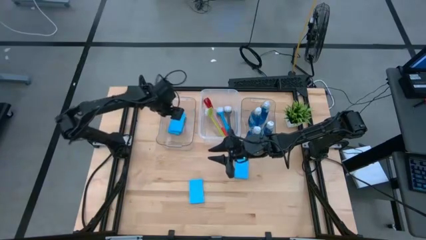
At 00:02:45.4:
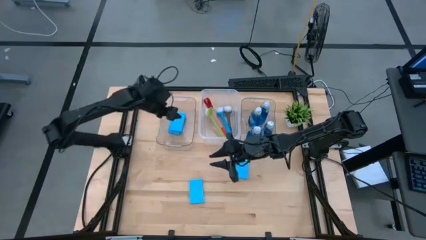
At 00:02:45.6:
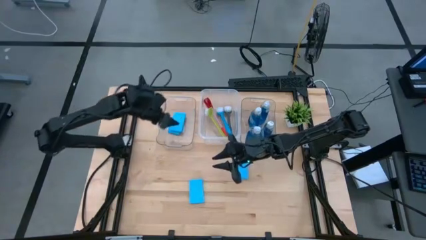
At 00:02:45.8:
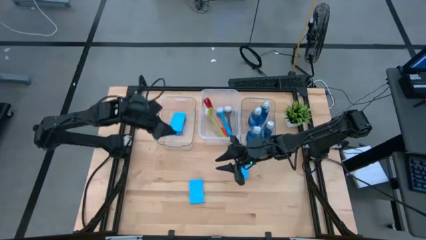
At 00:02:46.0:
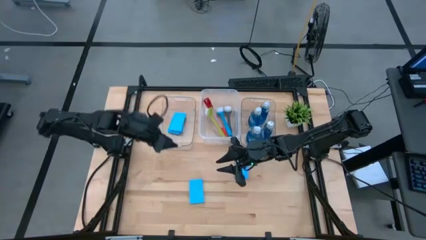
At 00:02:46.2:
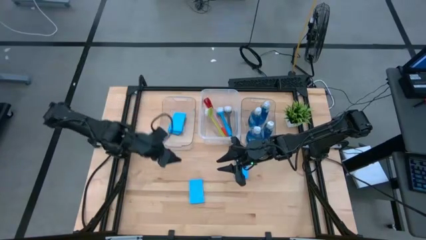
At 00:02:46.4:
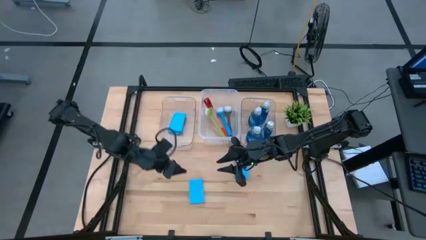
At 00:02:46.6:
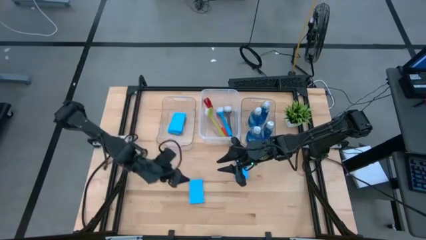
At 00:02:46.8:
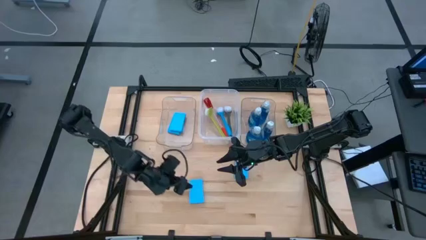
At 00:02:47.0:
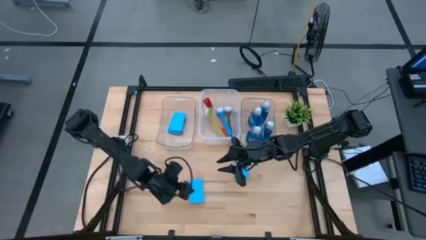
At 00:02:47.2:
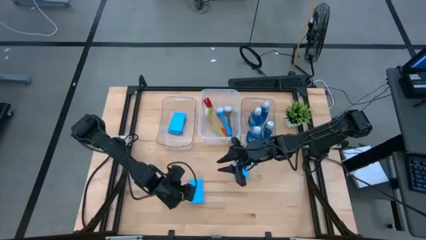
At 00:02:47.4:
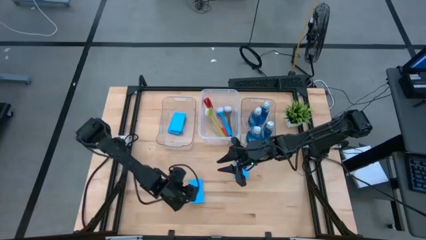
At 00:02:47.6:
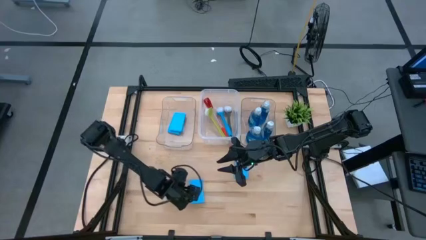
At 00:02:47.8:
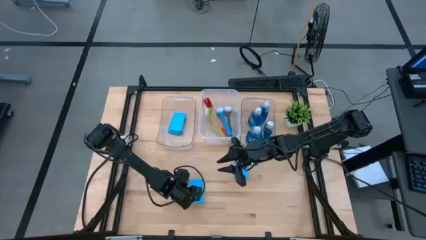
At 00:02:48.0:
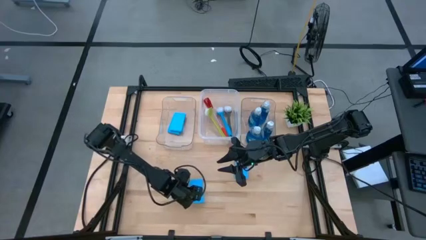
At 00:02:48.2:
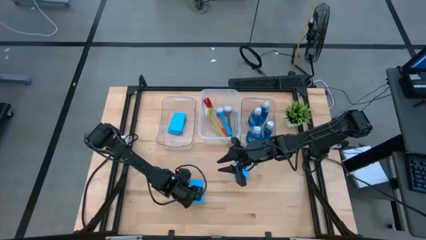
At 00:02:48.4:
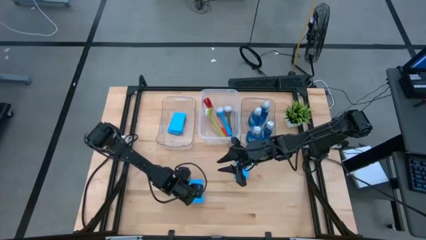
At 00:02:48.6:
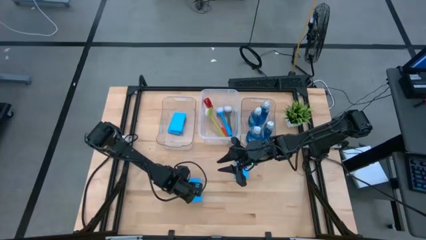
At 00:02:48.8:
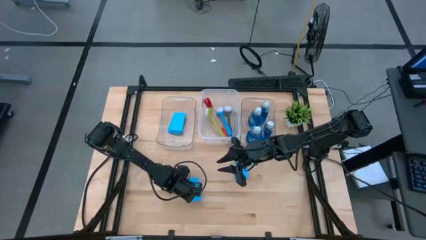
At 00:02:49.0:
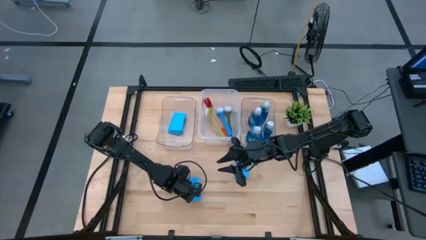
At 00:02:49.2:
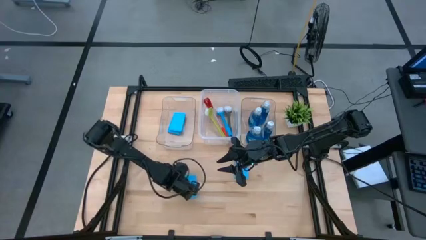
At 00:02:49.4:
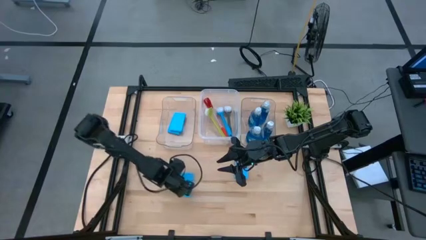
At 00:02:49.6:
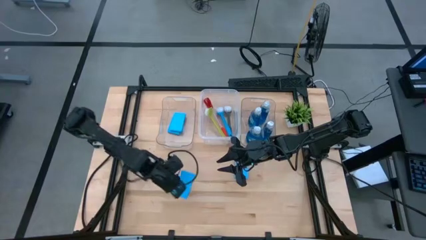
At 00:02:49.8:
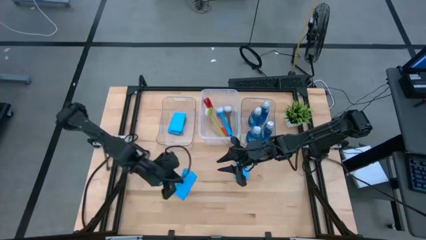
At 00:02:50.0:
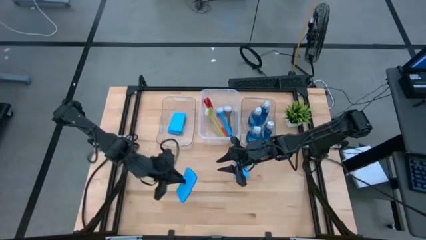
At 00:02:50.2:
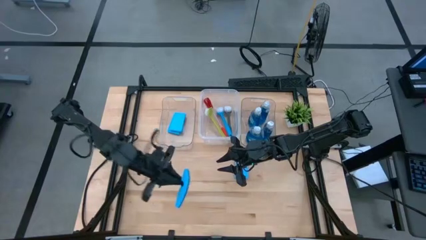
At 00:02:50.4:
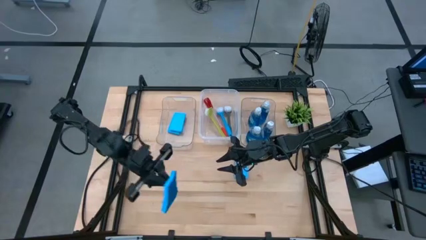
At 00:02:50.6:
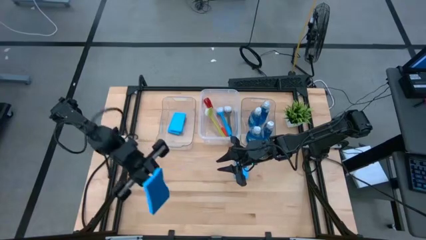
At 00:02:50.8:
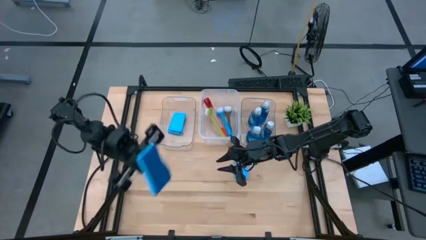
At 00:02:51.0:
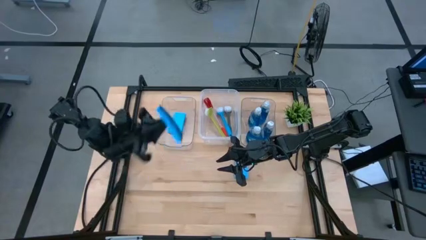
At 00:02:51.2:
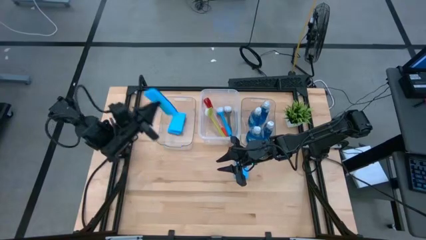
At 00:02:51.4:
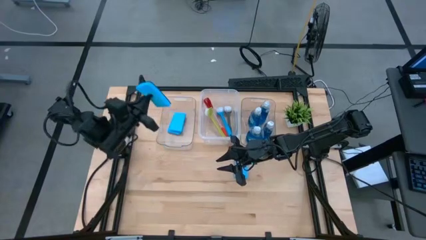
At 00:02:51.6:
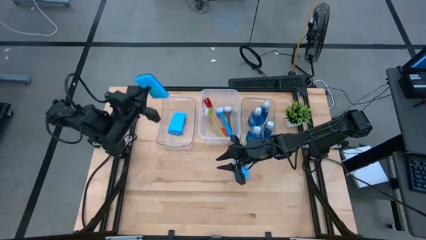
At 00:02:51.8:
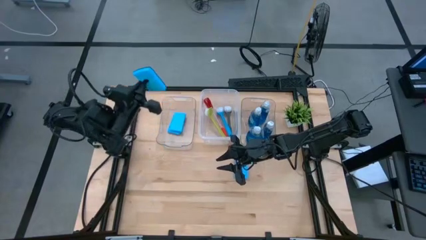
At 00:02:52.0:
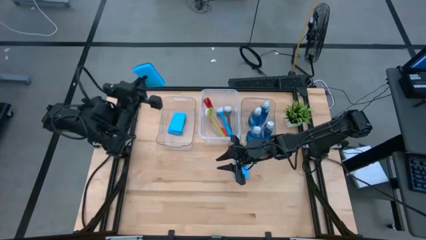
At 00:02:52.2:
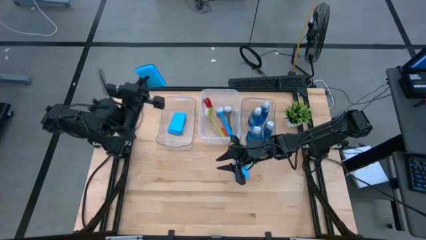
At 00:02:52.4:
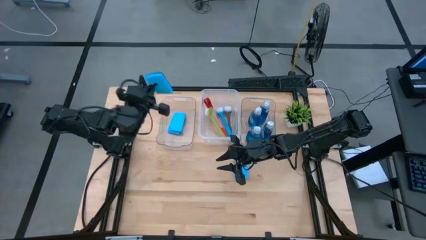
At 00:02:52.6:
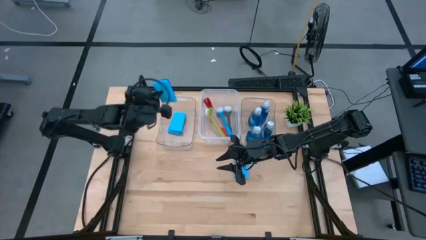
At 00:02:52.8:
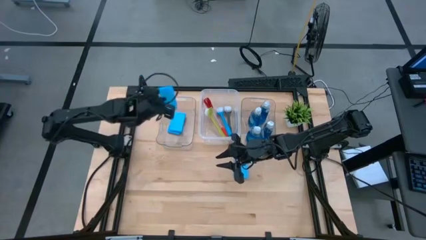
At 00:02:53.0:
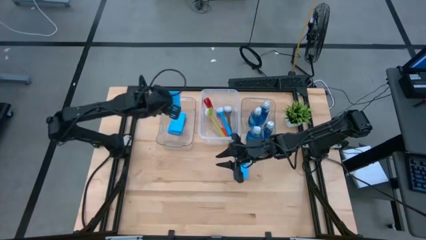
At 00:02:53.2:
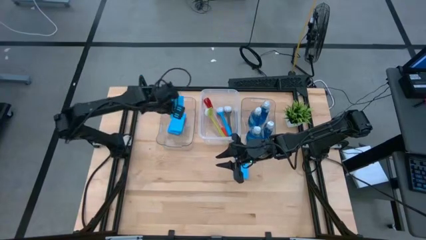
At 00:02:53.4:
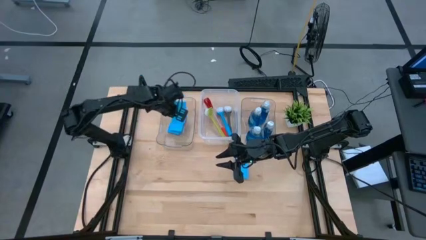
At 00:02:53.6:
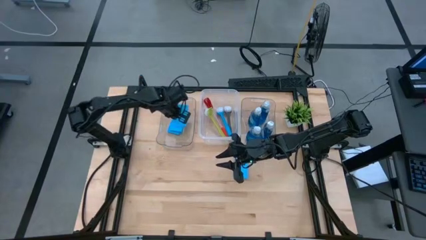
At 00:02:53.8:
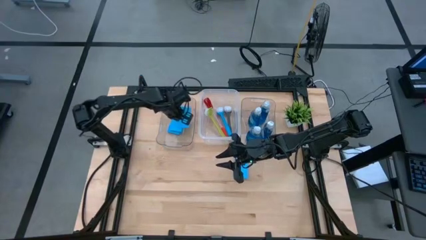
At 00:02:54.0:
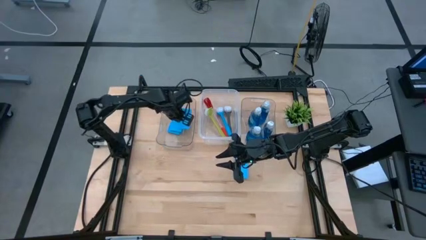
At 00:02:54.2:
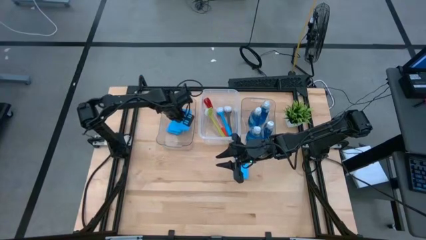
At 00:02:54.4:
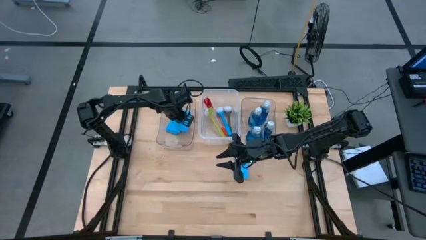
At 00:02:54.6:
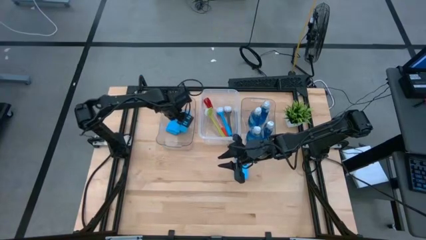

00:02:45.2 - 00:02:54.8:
Task: Pick & Place Kitchen Sink Supplies
Put the blue sponge into the left transparent bin
